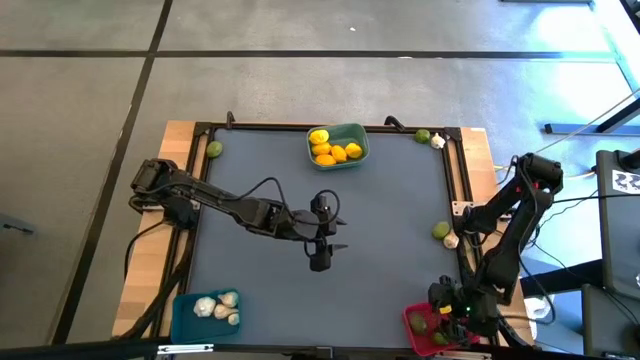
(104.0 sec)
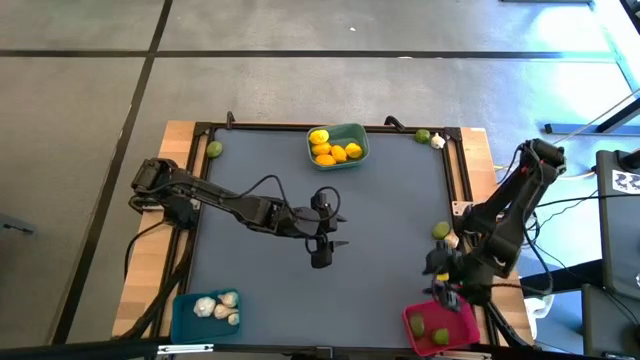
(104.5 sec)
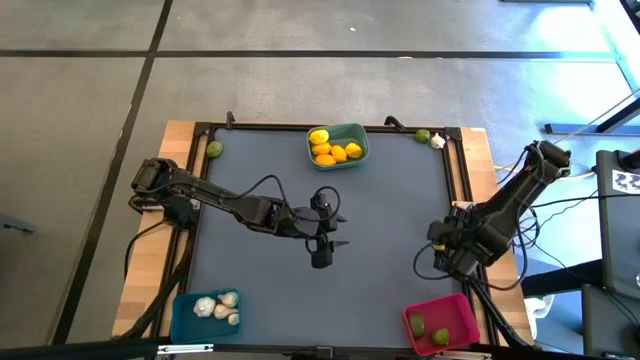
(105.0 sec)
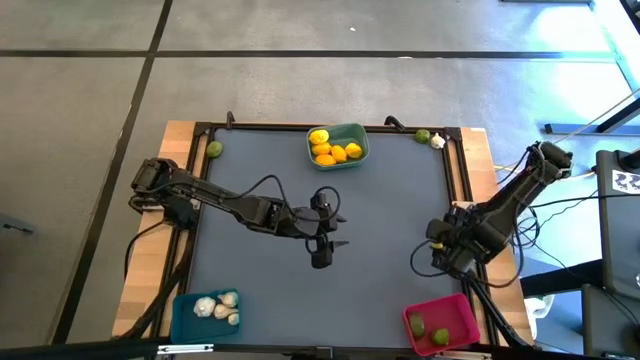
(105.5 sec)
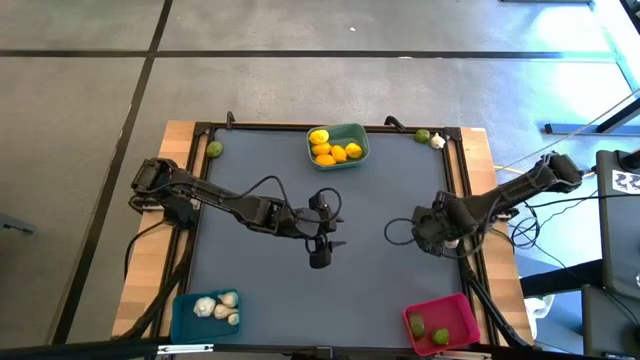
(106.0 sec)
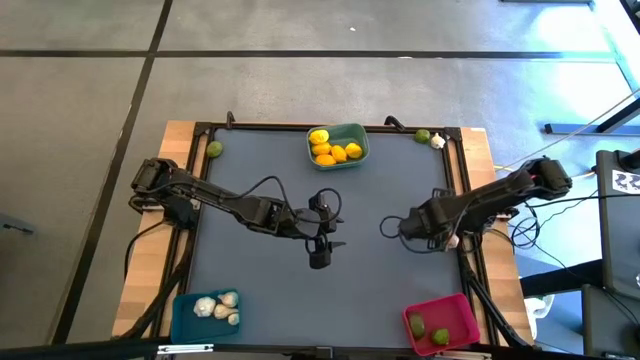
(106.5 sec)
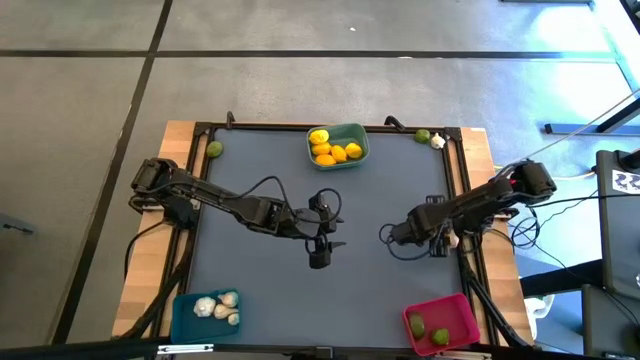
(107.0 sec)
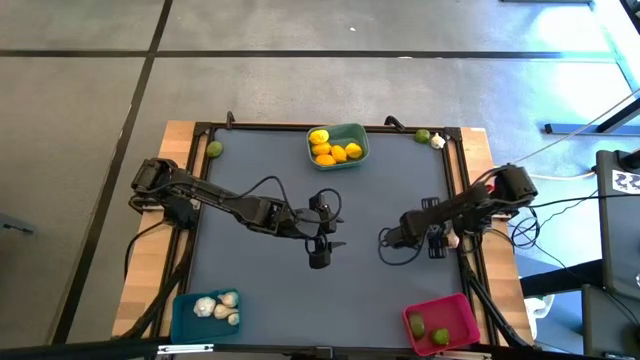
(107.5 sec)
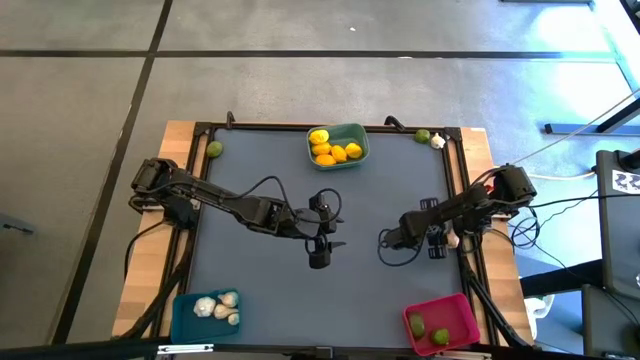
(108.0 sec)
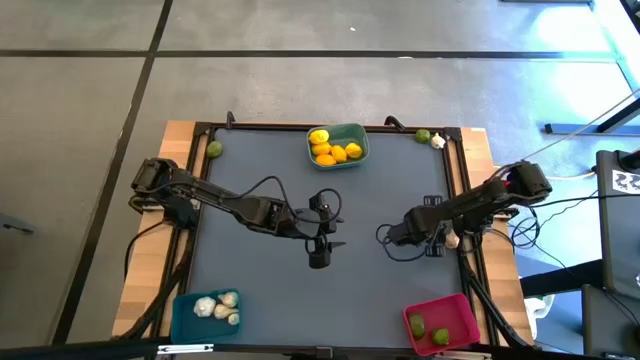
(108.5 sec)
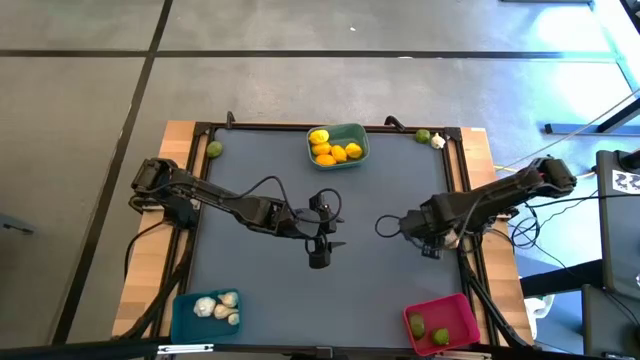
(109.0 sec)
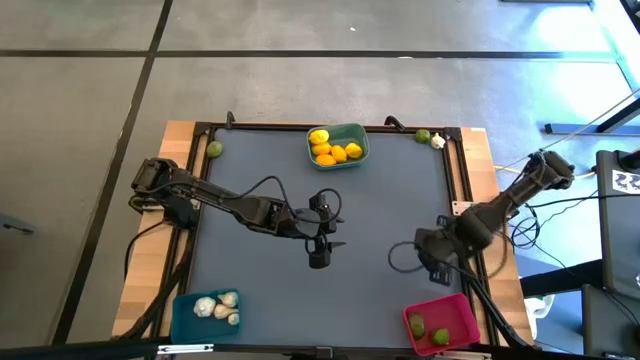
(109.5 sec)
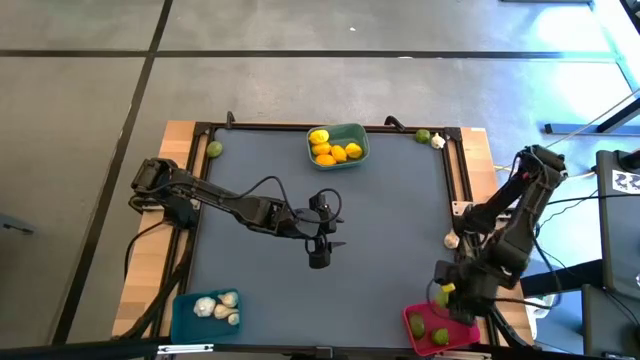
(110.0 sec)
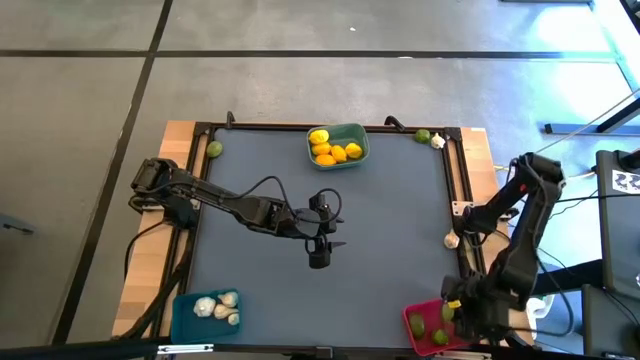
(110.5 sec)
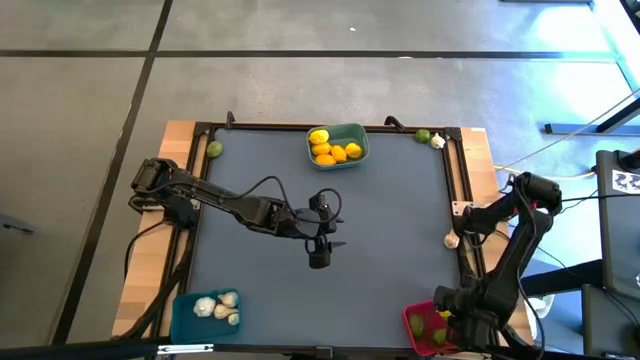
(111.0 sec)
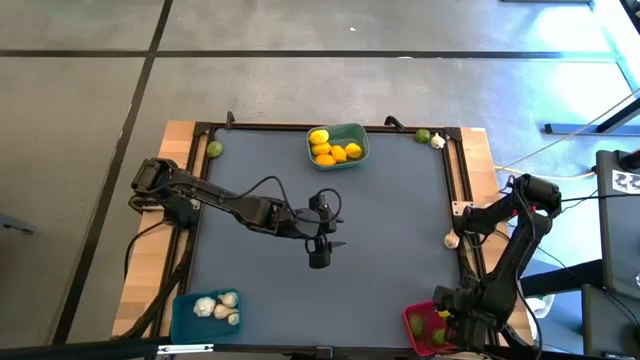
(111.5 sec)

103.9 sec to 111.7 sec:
Task: Sort produce into baskets
Put the green lime into the pink bin

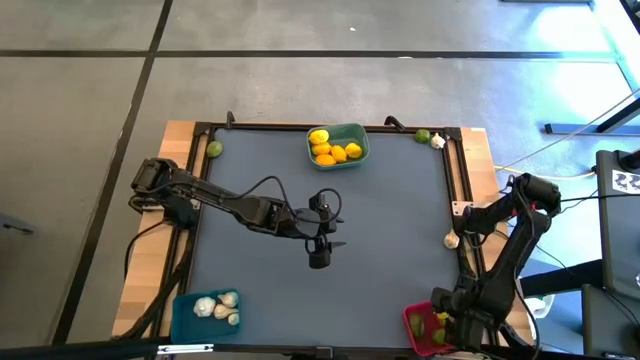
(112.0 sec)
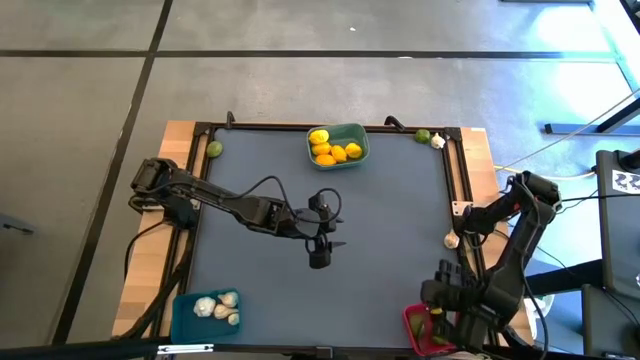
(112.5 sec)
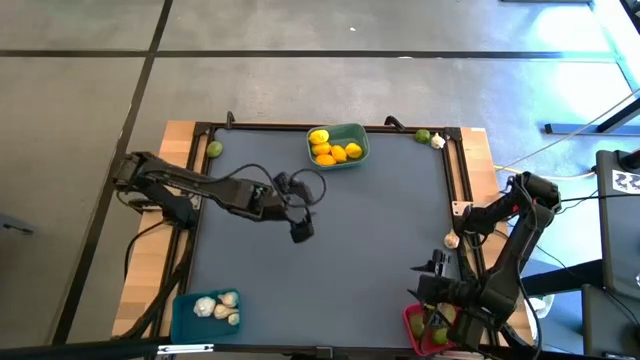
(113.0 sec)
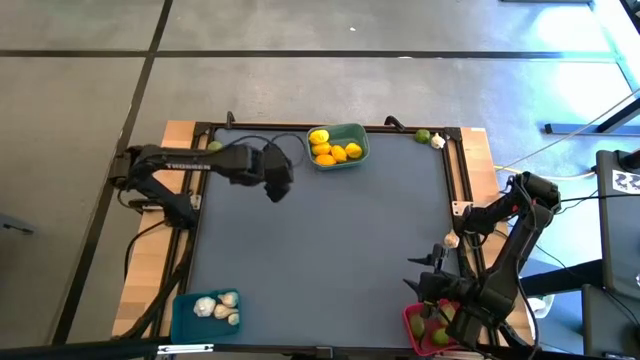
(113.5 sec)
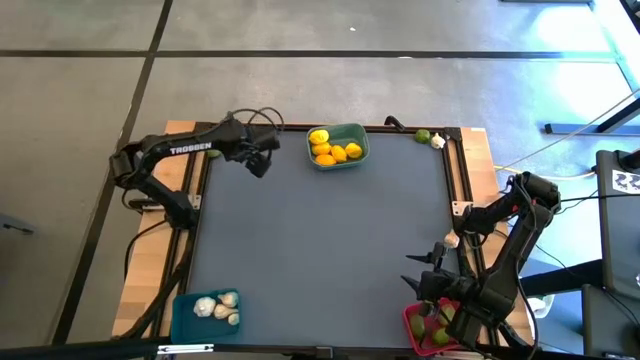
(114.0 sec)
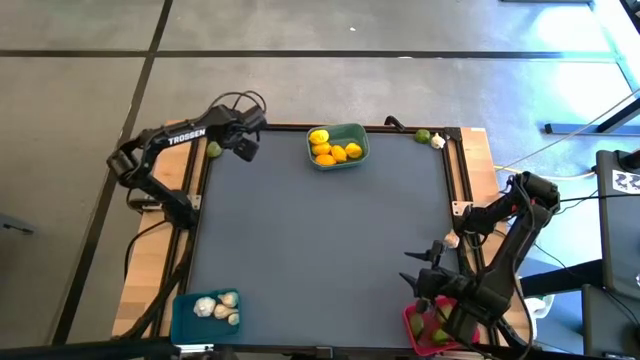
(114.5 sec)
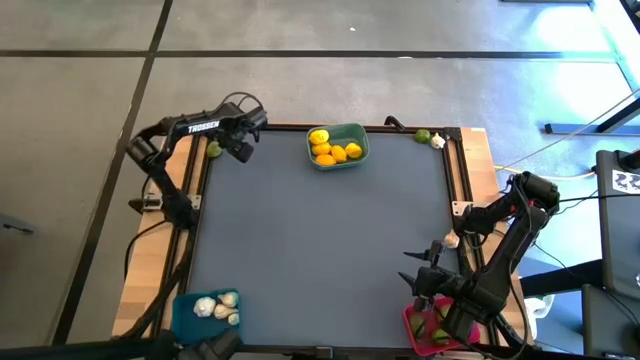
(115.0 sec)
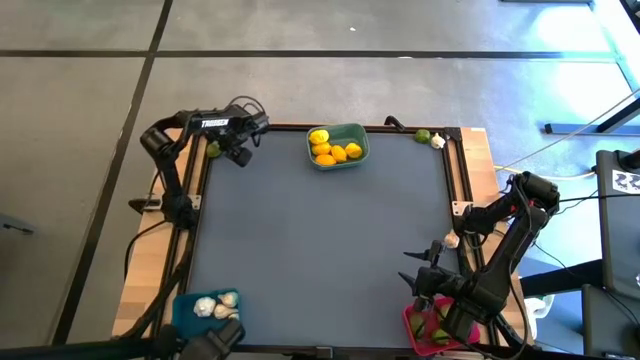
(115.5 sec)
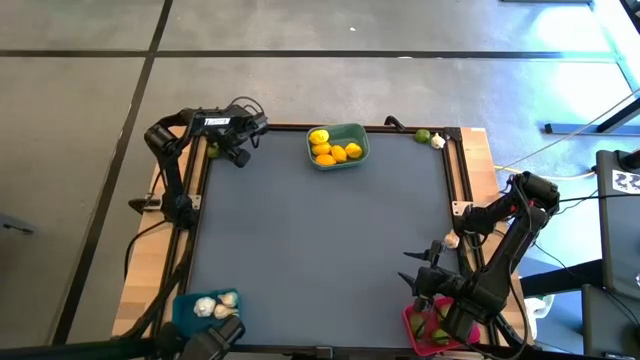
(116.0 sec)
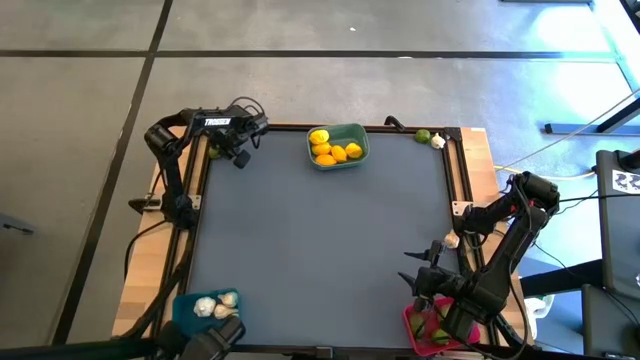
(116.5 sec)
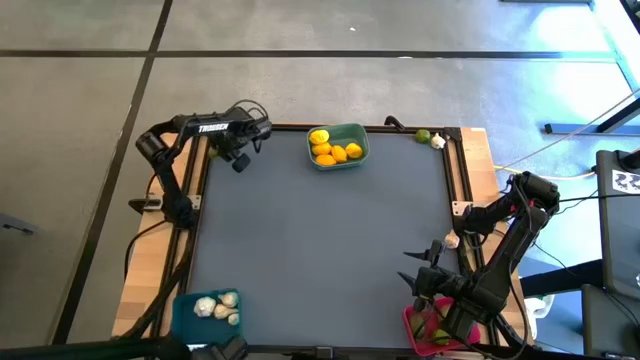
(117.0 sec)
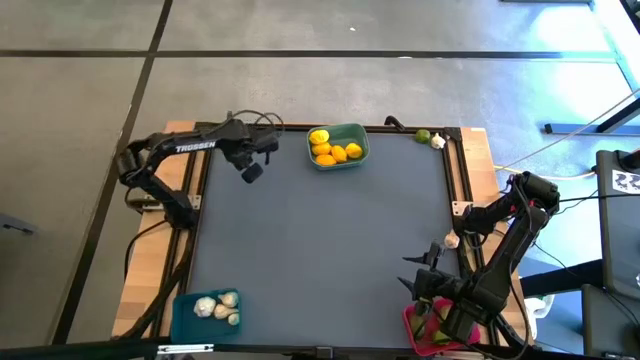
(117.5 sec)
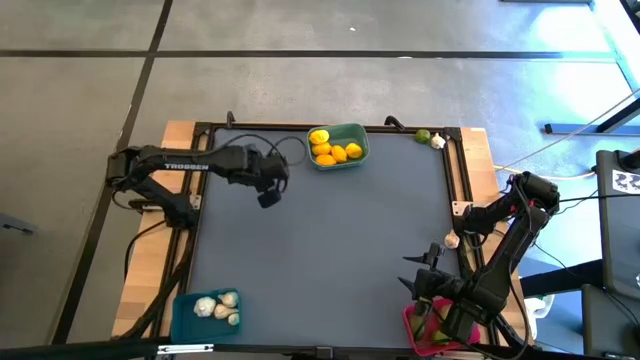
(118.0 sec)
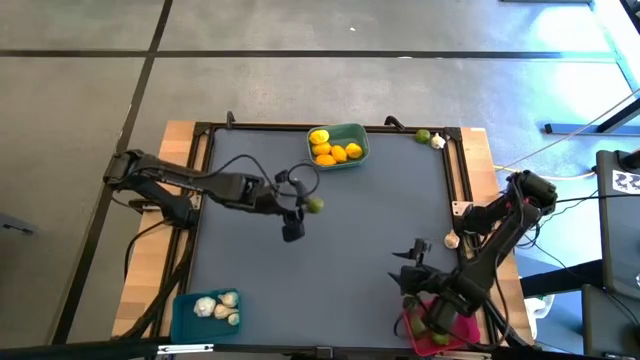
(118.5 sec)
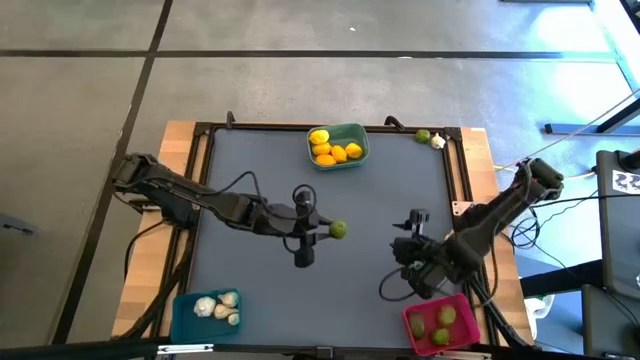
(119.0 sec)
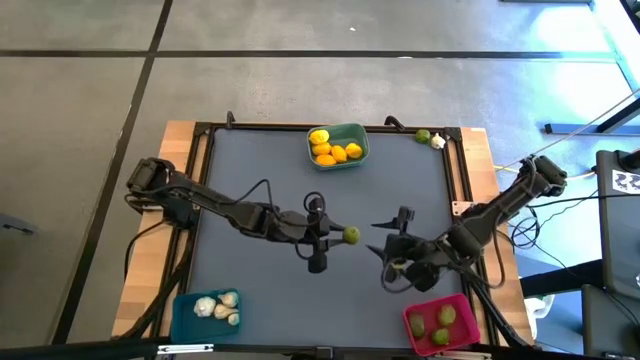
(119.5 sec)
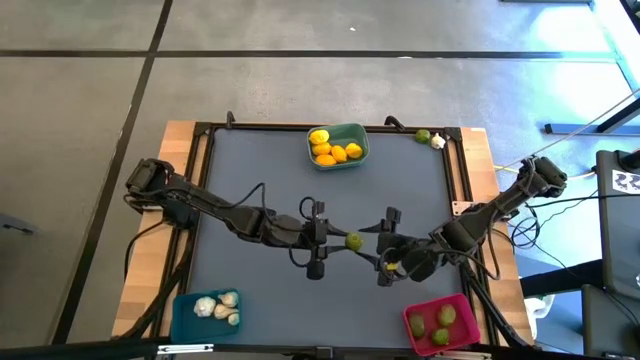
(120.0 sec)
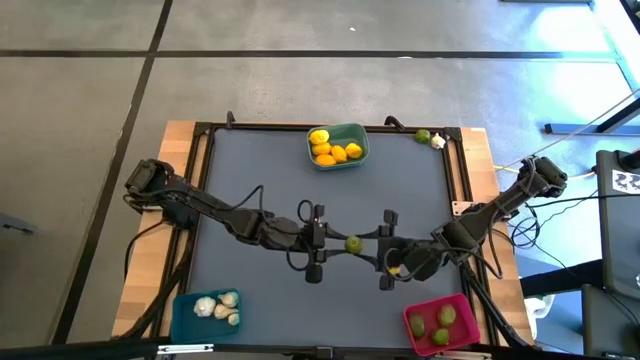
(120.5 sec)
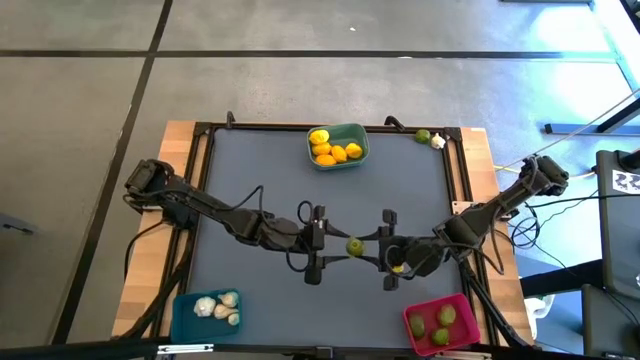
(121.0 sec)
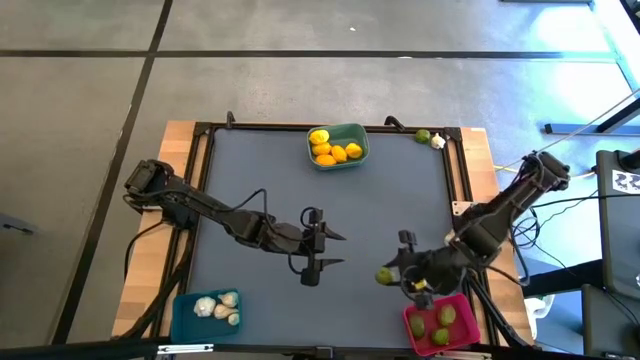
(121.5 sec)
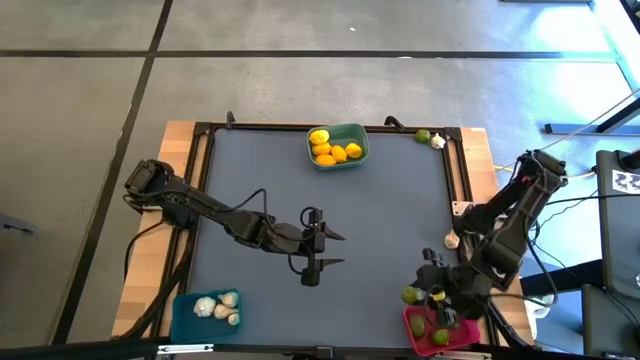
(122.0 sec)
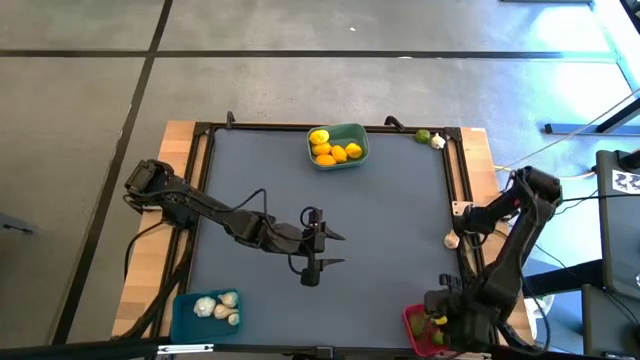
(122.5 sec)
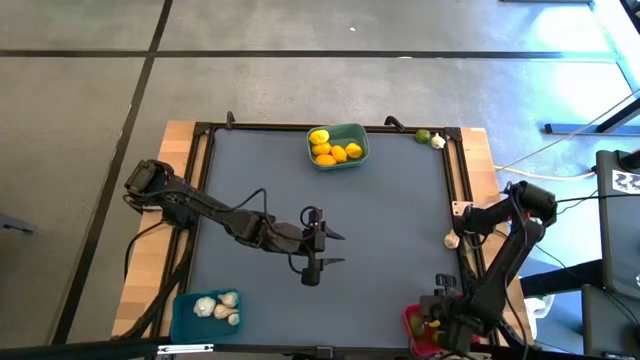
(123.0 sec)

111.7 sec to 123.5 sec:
Put the green lime into the pink bin

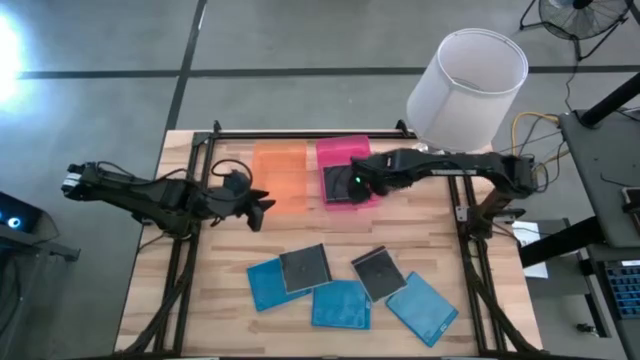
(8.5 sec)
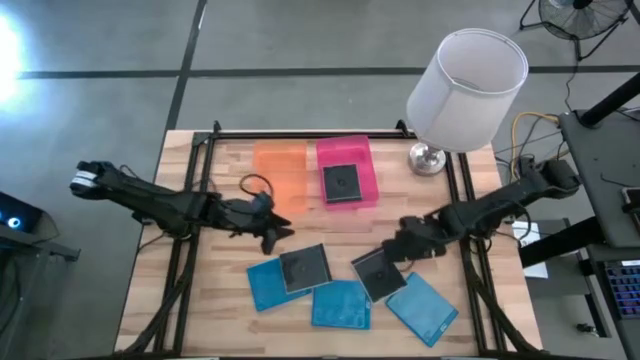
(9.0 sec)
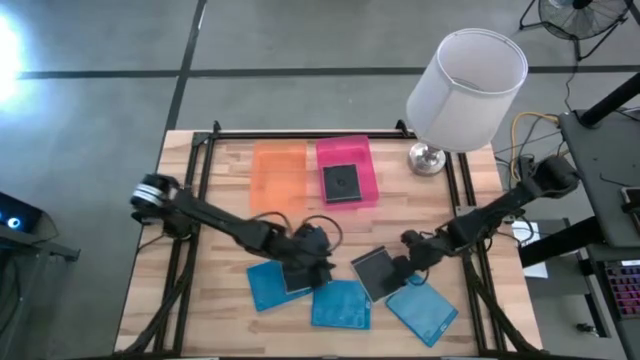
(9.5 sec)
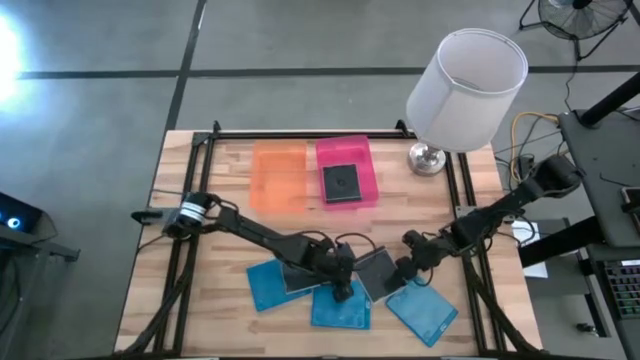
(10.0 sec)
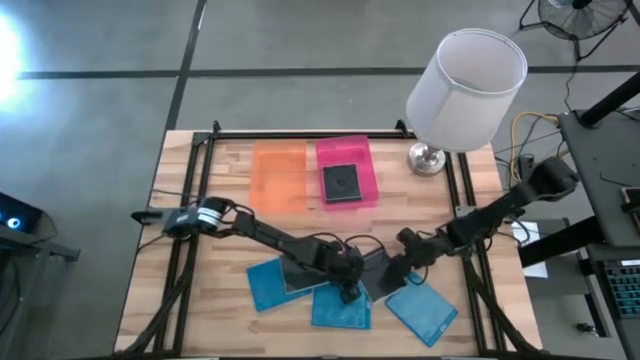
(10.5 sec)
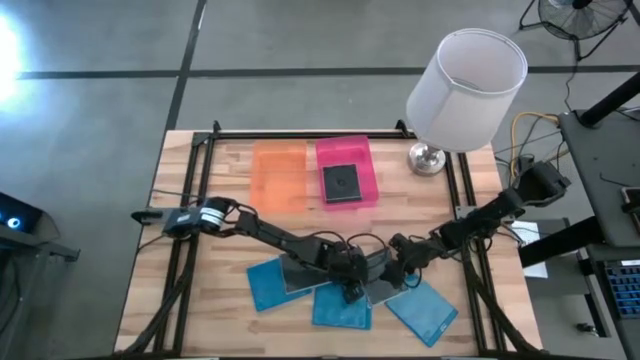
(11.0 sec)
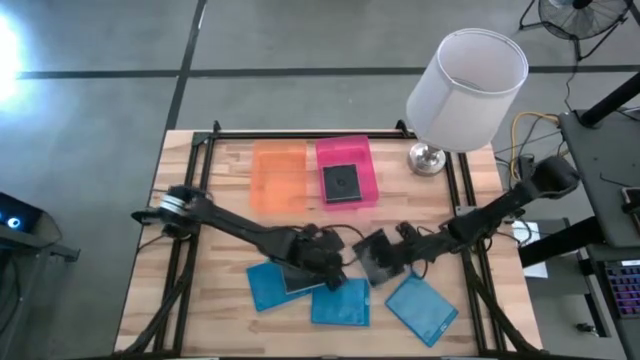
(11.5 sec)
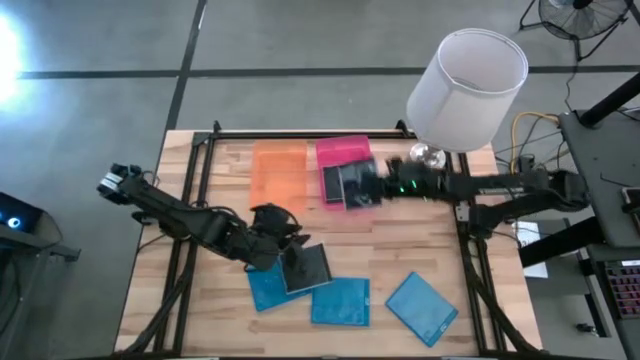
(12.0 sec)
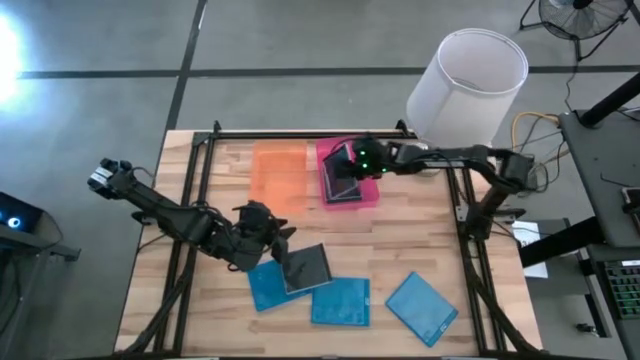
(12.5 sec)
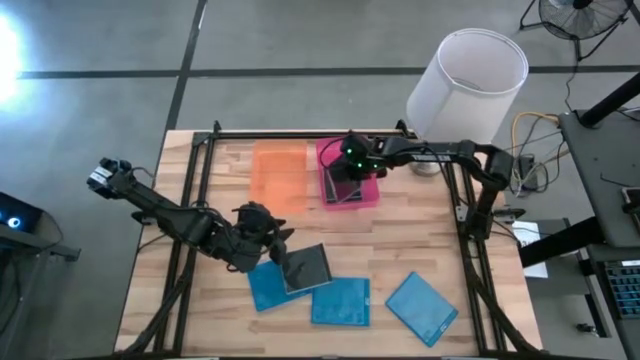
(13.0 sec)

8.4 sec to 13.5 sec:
Task: Pick & place jewel cases by type
Put the right black CD case into the pink bin
